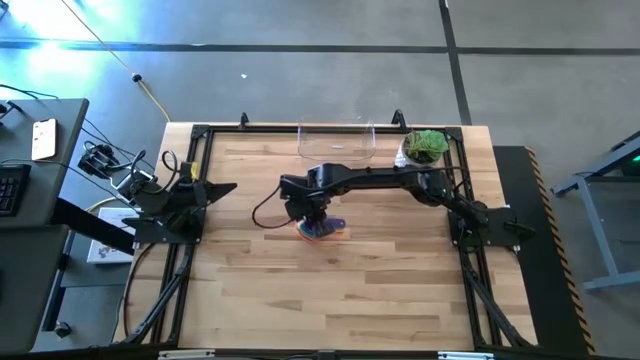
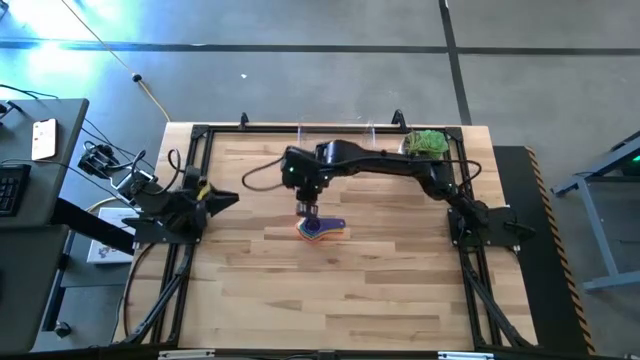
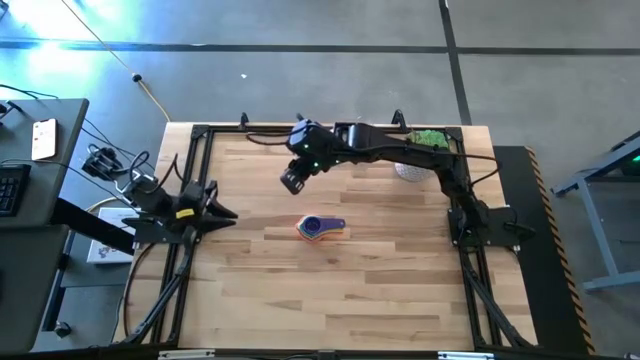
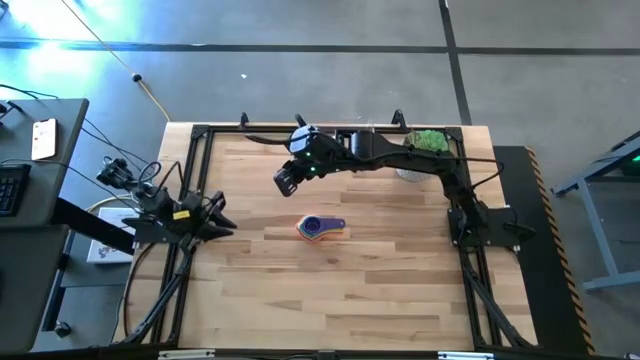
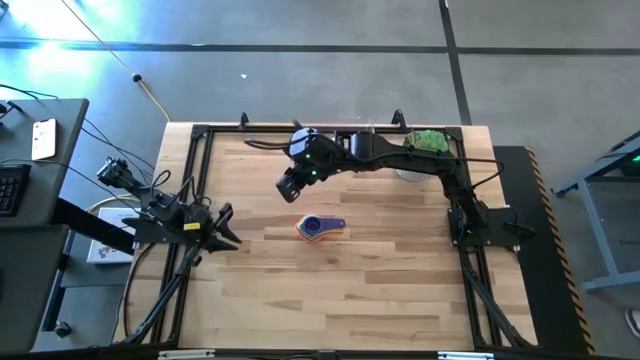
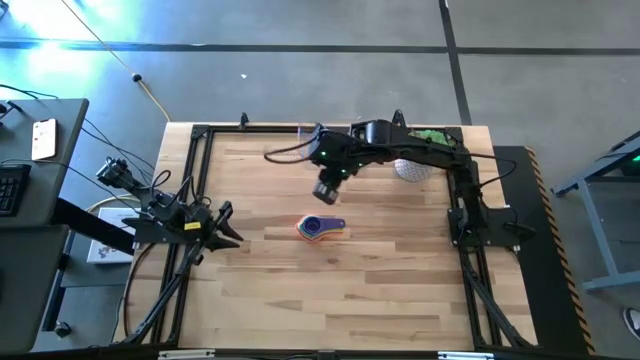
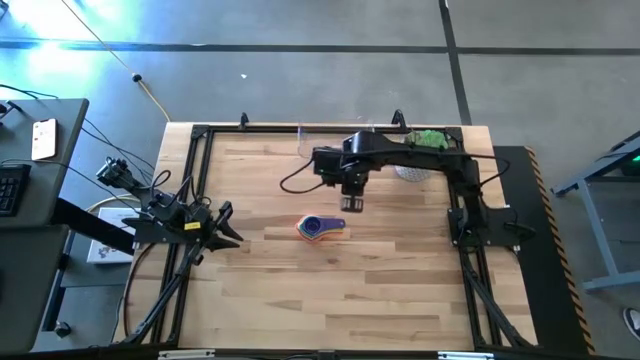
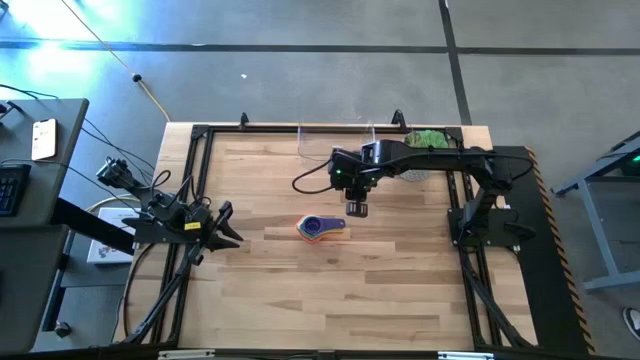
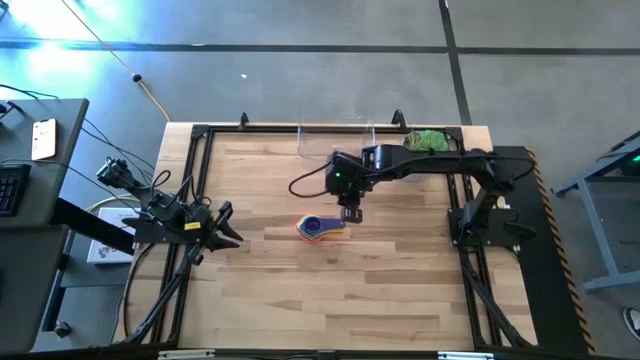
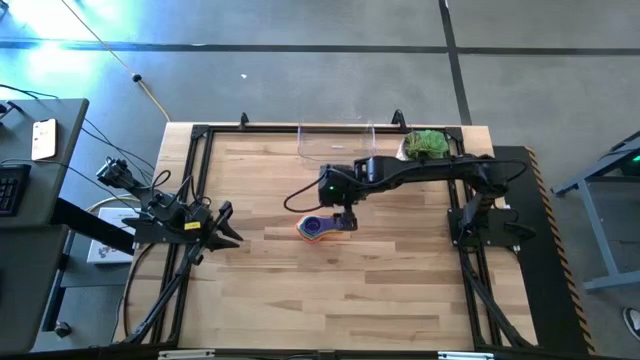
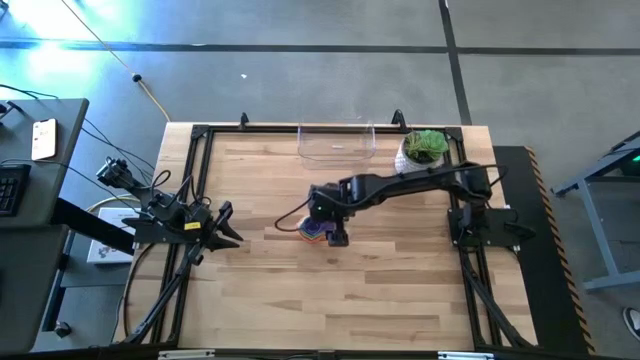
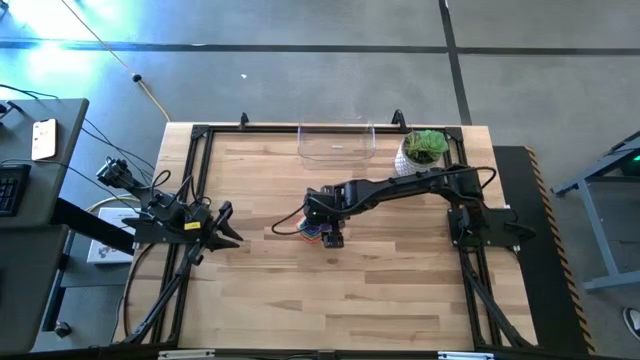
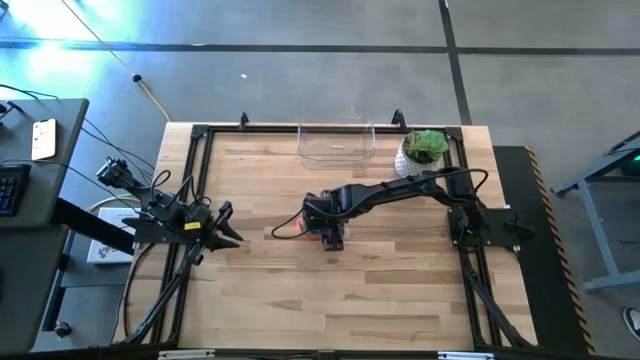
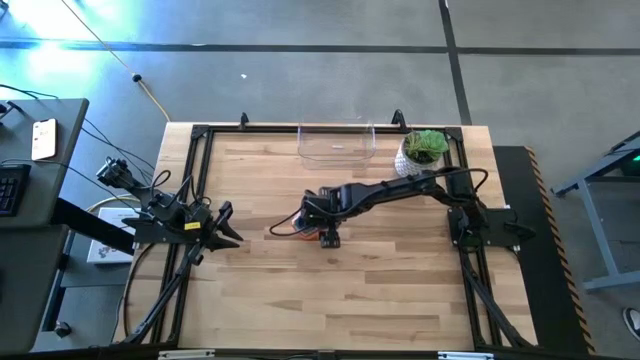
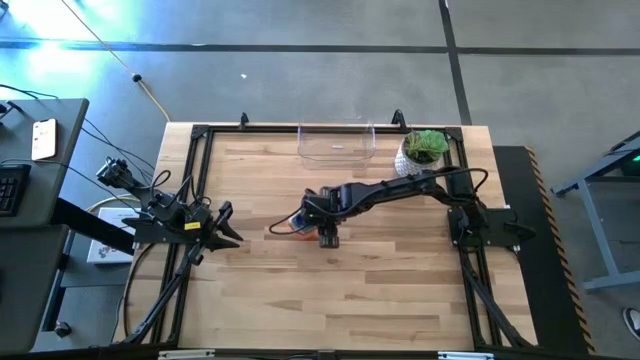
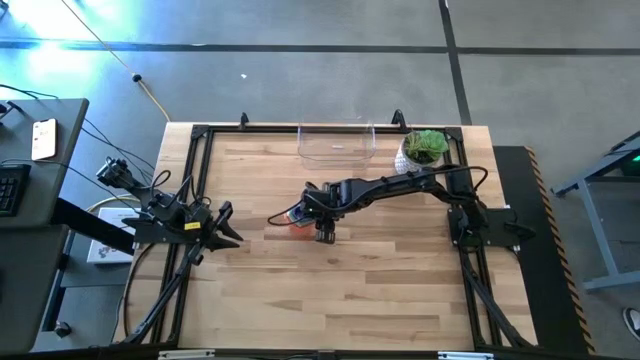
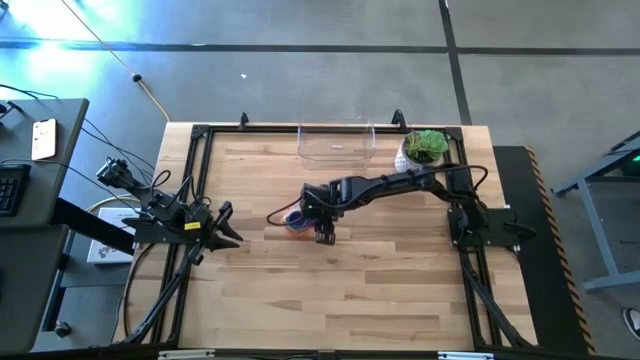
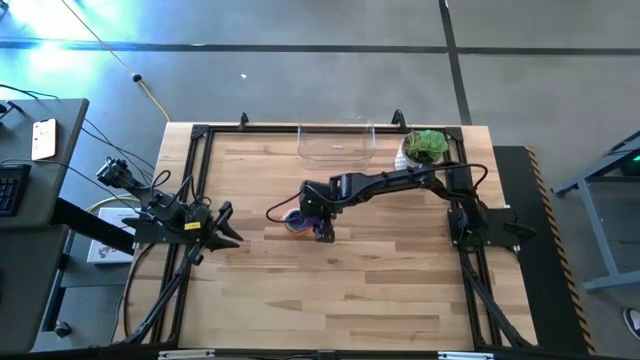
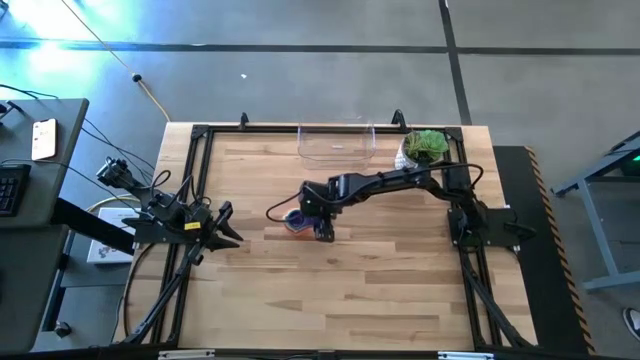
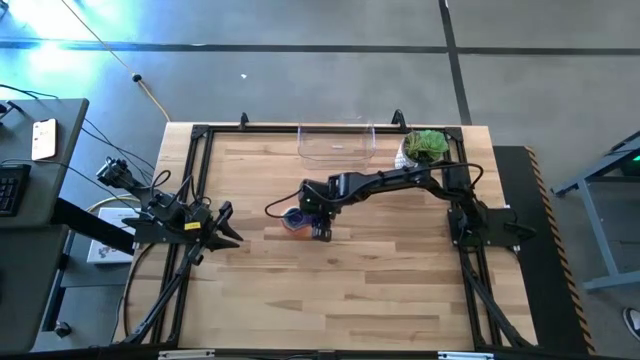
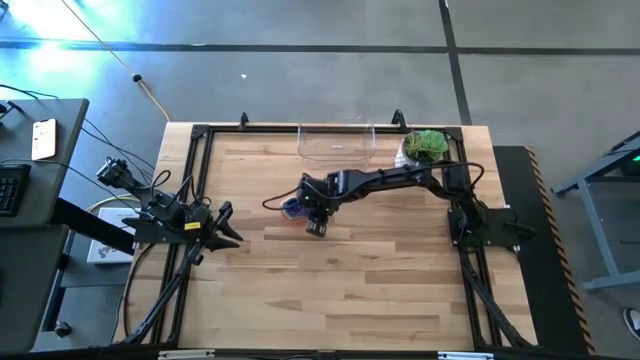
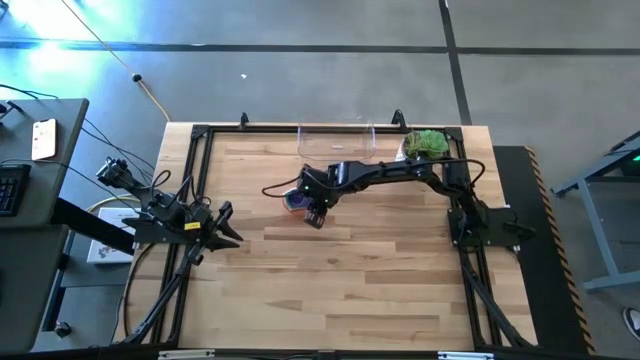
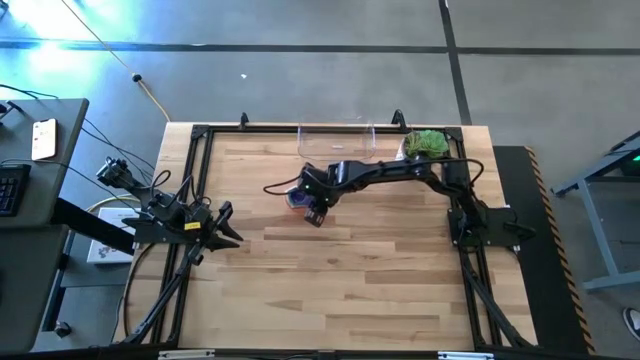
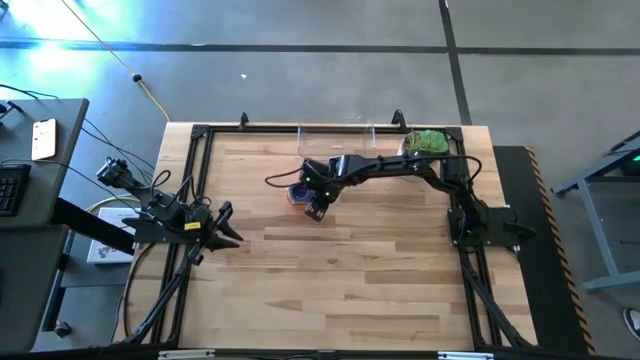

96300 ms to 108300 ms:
Task: Nest measuring cups in basket
Put the stacked measuring cups into the transparent bin

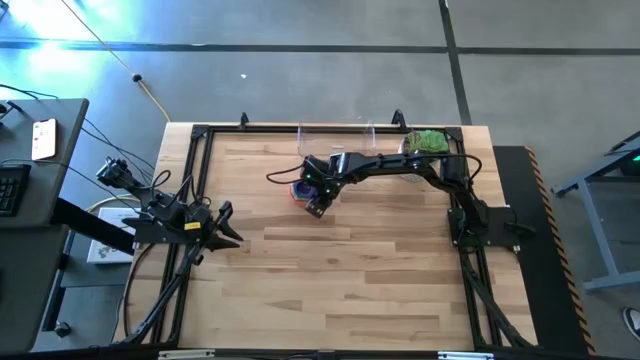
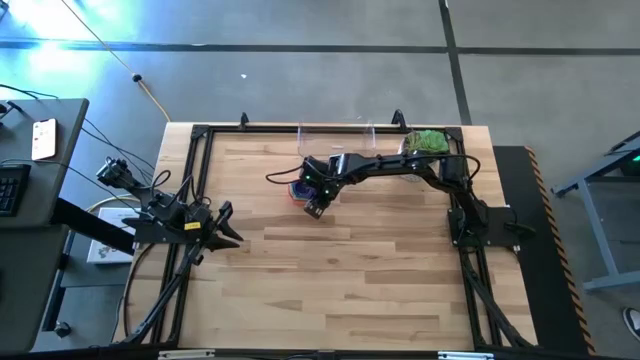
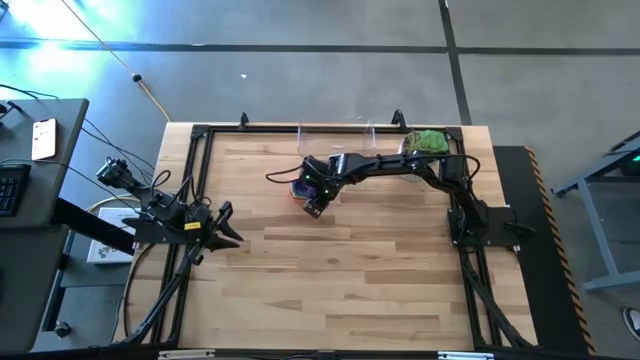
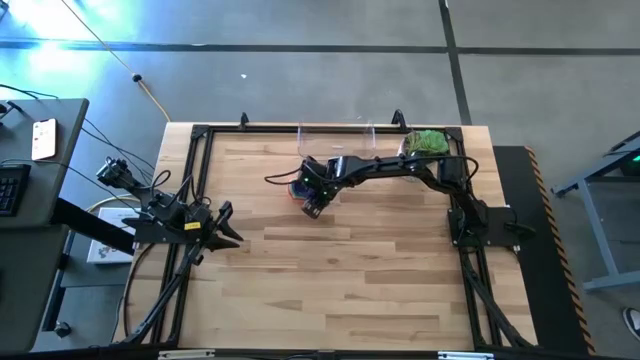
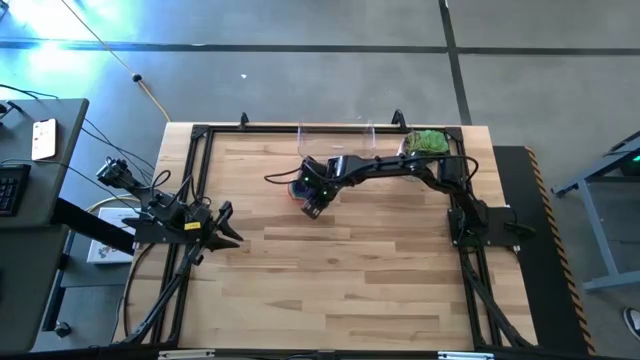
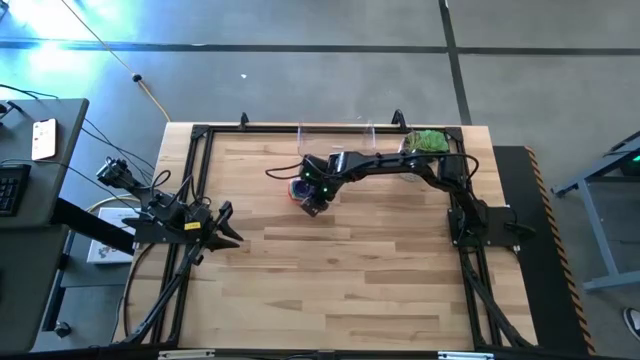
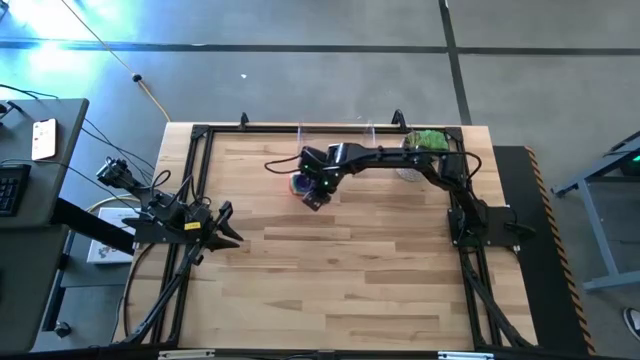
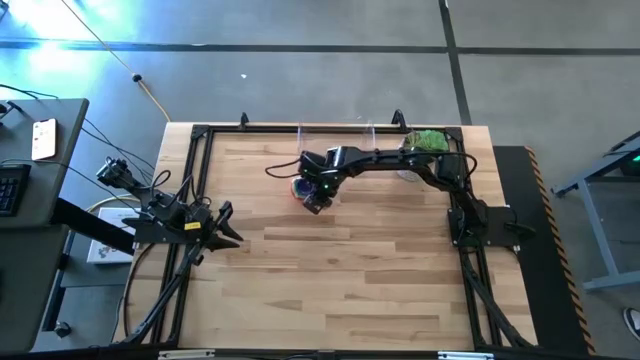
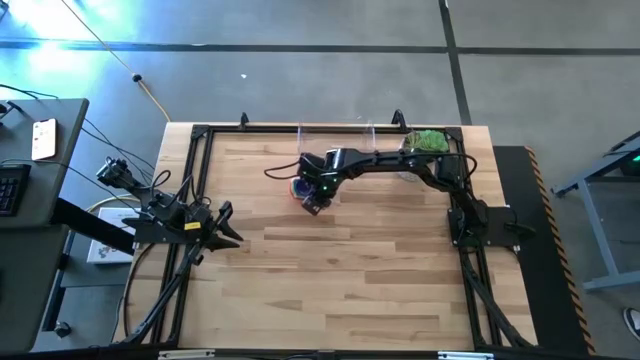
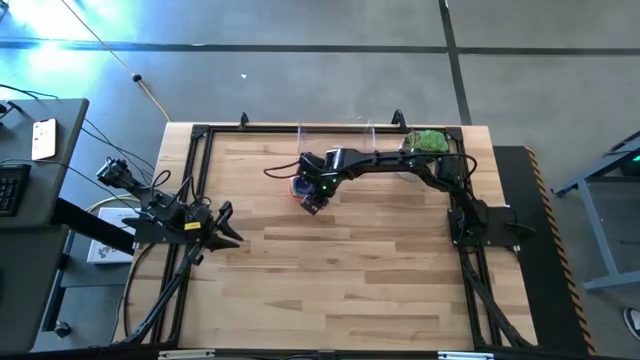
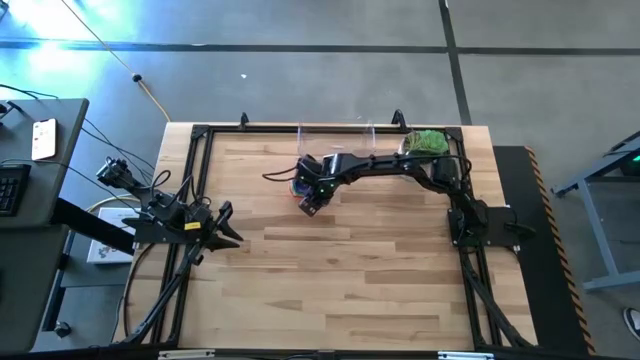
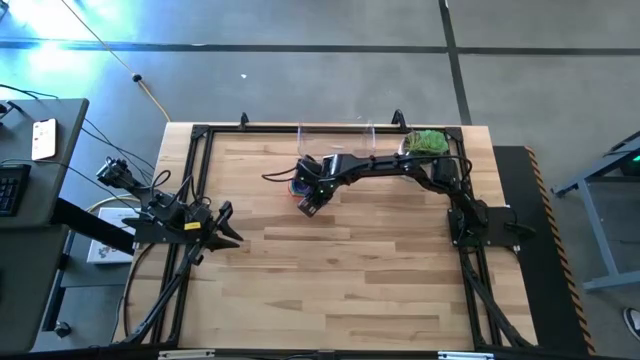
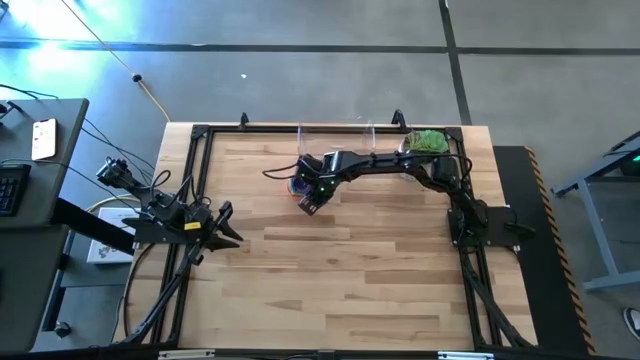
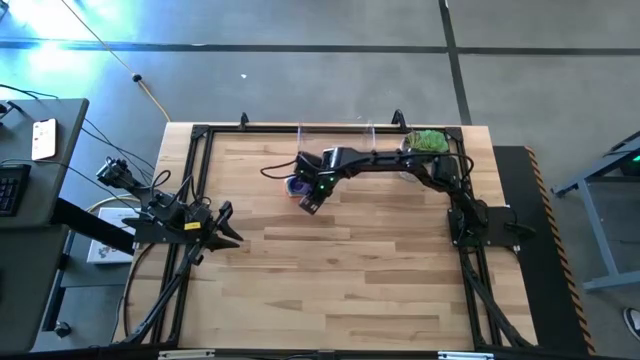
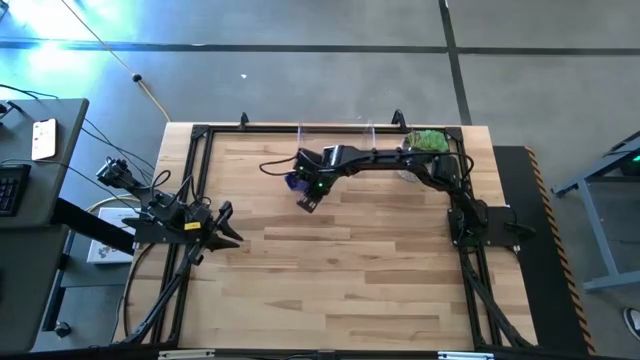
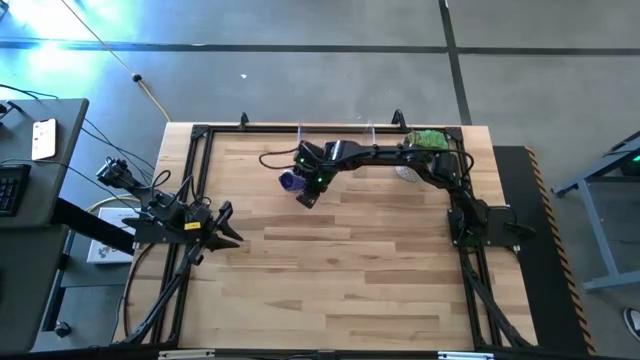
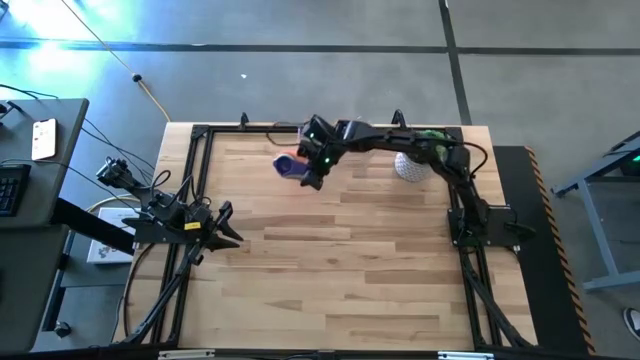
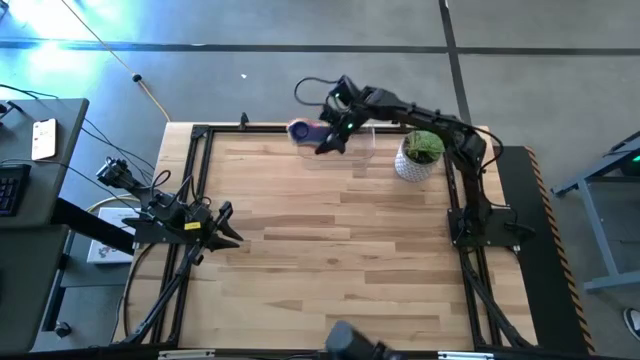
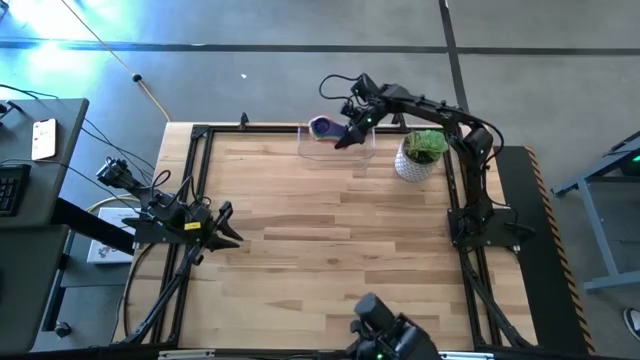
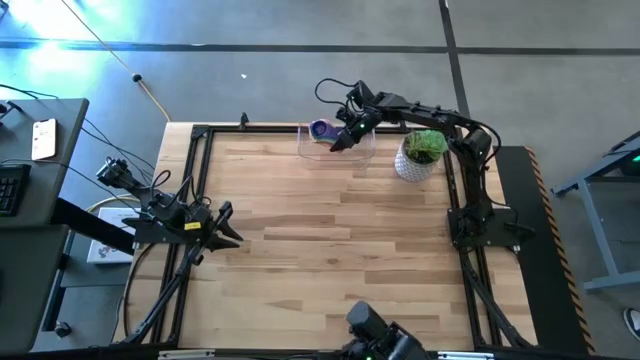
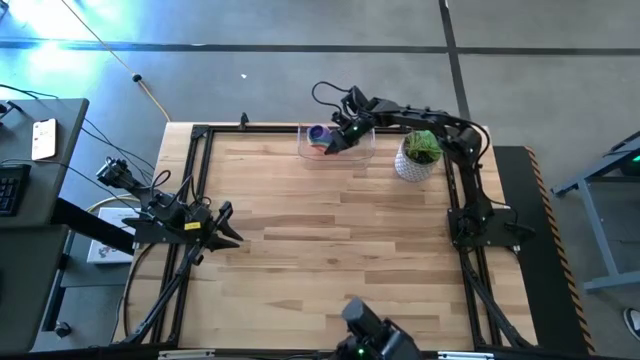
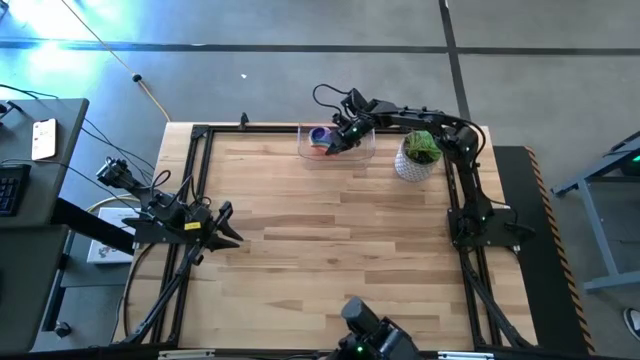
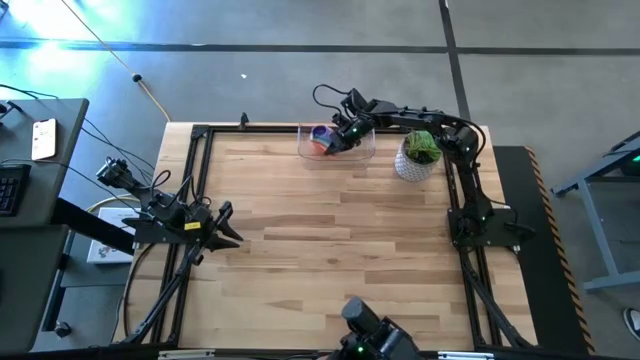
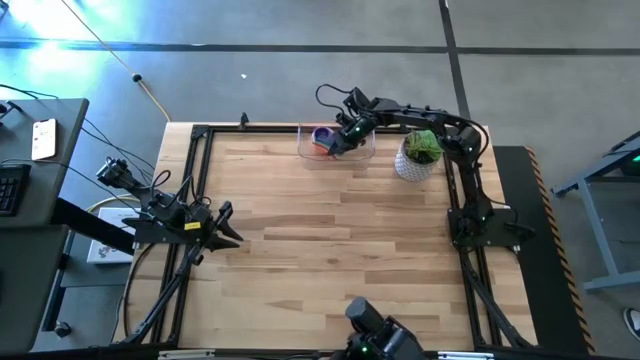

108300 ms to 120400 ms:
Put the stacked measuring cups into the transparent bin
